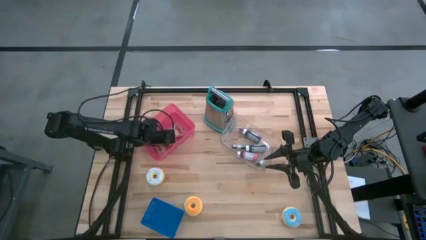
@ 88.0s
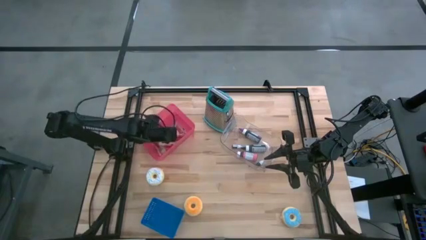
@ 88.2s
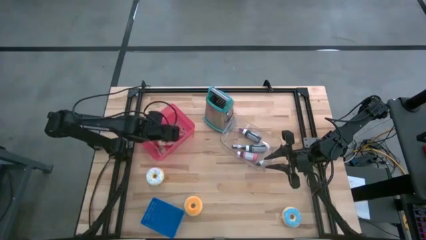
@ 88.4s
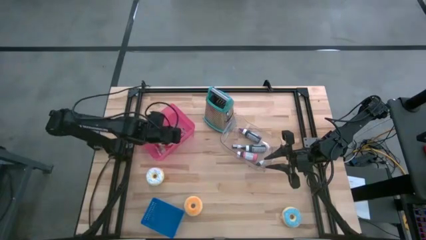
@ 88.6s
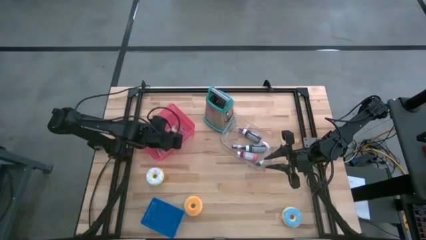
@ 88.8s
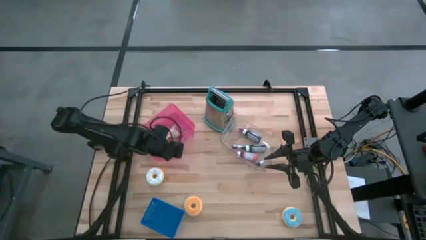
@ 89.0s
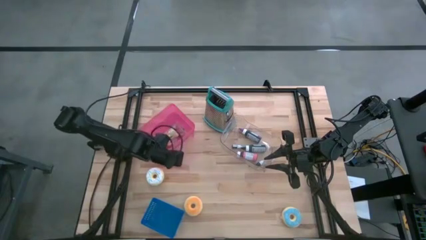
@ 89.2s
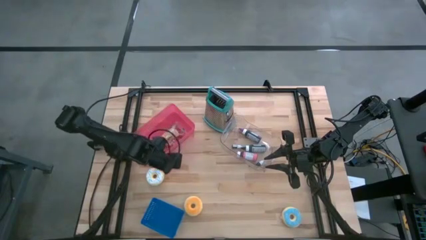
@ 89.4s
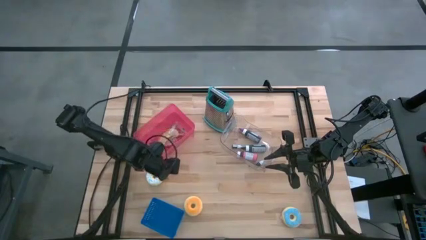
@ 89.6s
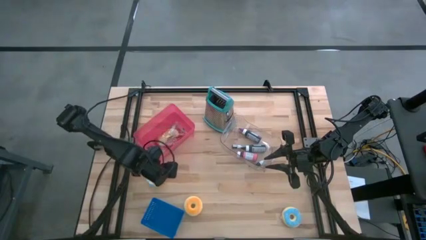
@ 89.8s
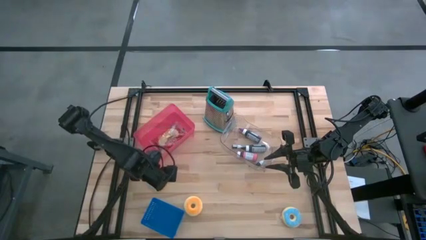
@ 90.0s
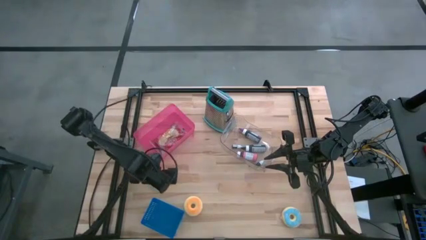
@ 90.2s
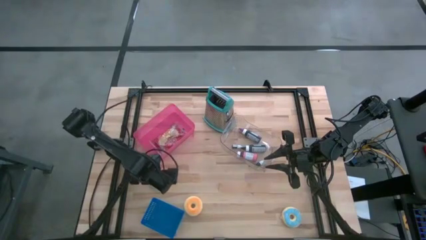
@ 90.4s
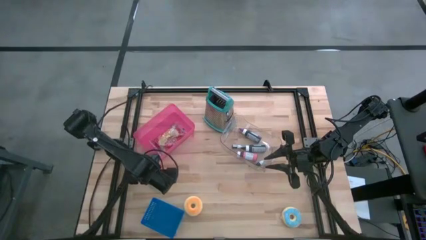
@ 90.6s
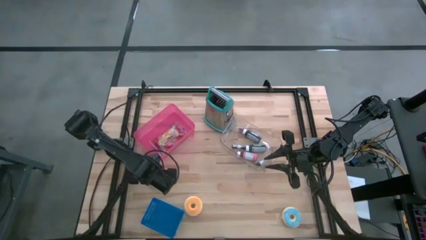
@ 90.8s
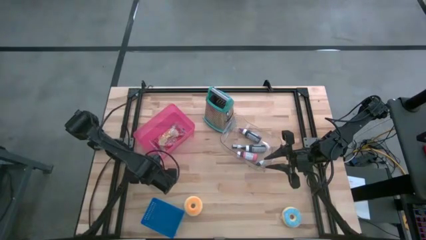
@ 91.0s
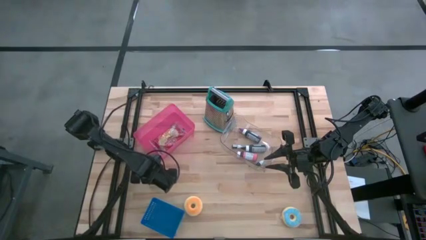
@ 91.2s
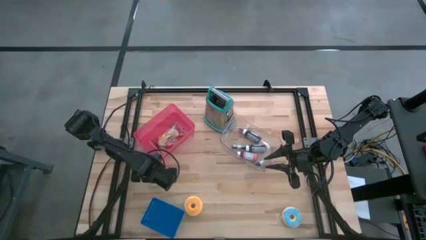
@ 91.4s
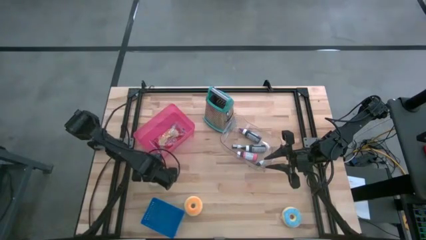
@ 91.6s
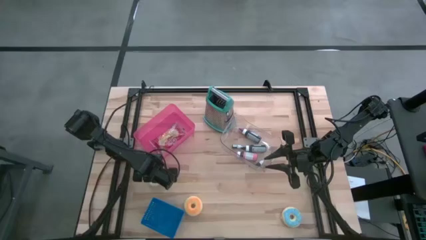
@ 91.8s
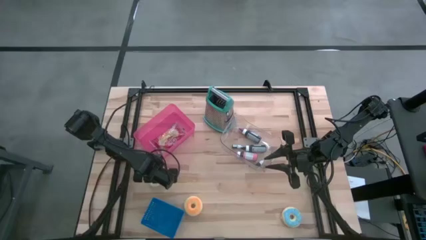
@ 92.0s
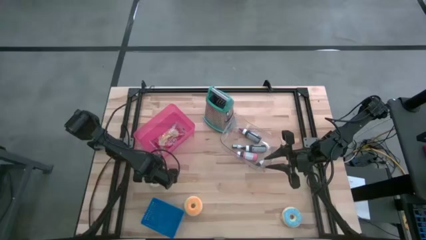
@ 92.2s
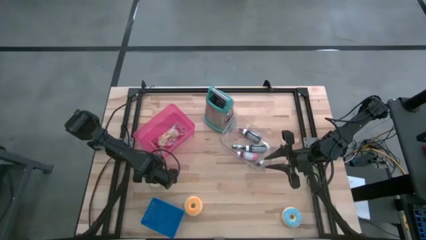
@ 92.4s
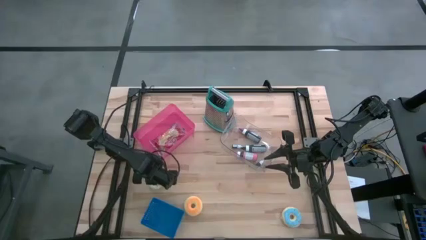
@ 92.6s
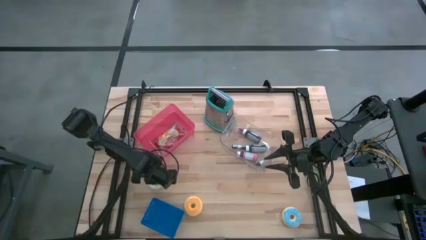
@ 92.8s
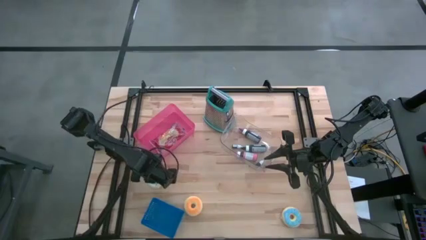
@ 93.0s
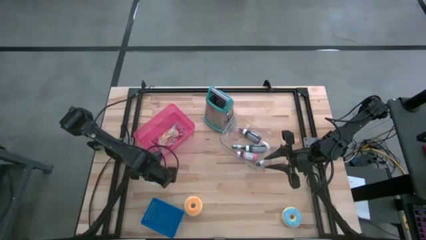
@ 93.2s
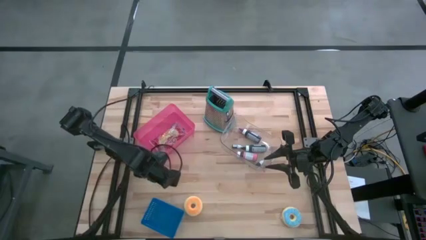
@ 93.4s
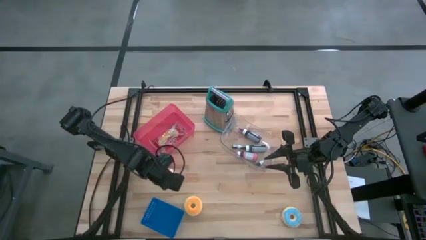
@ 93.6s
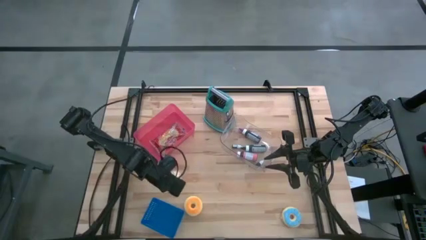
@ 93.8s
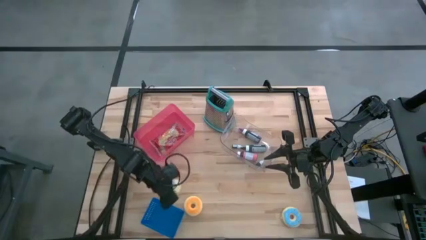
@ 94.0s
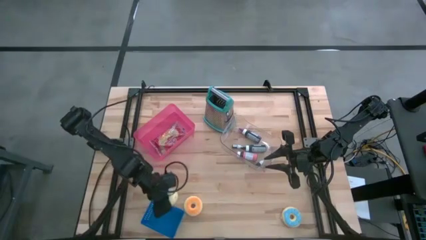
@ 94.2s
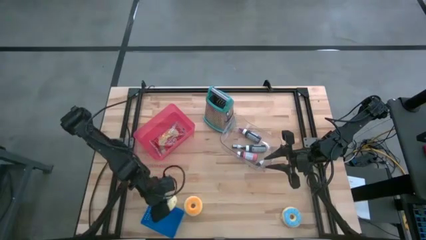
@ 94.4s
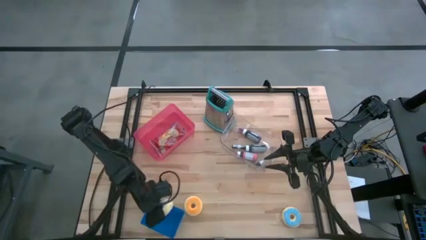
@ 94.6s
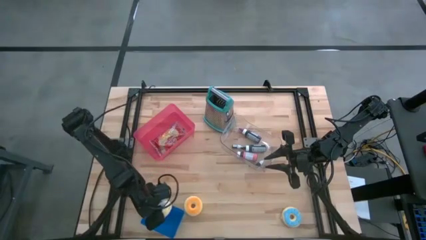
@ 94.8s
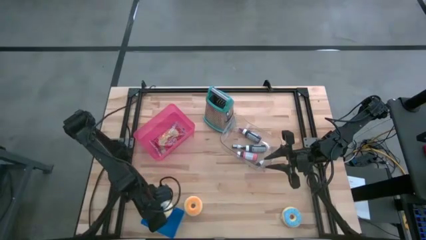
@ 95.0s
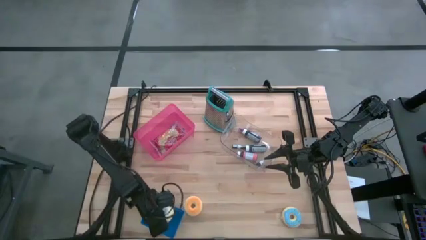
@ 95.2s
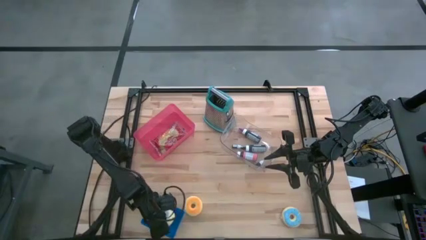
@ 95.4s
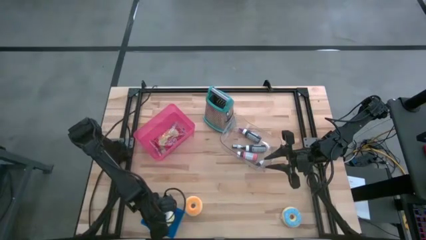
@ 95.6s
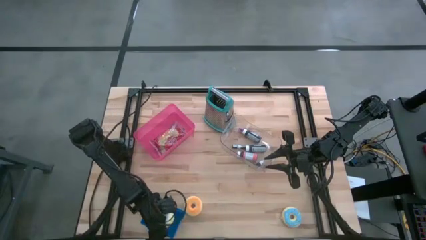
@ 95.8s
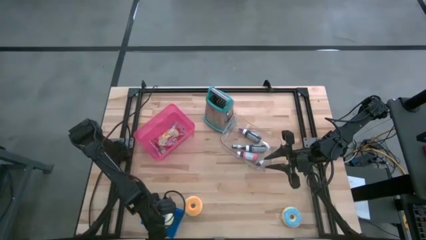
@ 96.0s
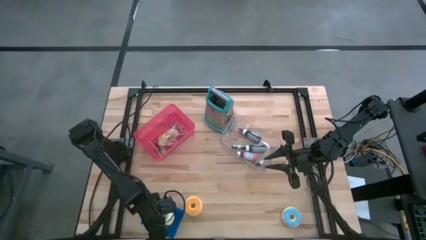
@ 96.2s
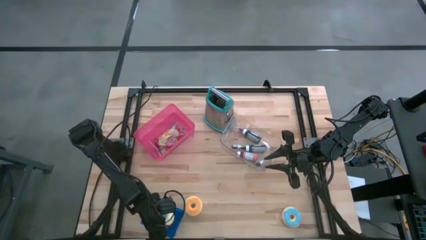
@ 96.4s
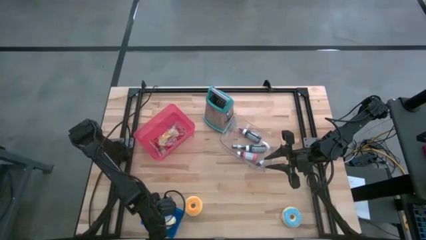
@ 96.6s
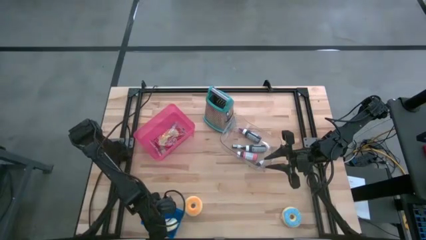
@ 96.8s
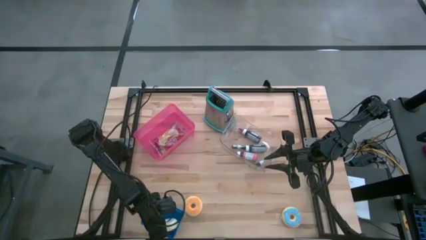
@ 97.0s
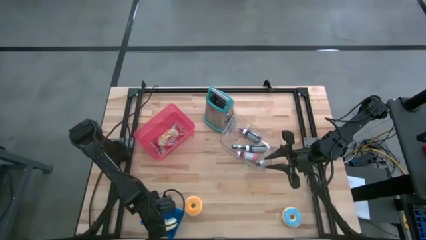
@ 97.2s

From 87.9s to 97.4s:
Task: Pick & Place Food Item
Put the white donut into the blue bin

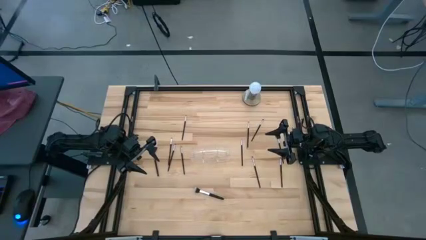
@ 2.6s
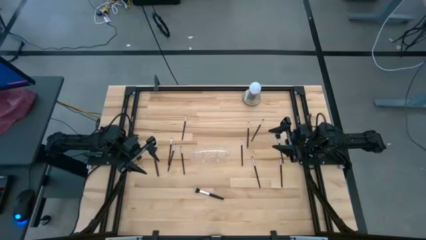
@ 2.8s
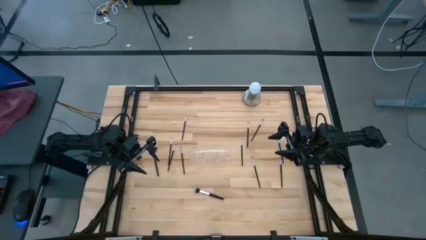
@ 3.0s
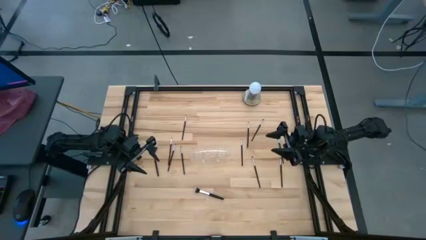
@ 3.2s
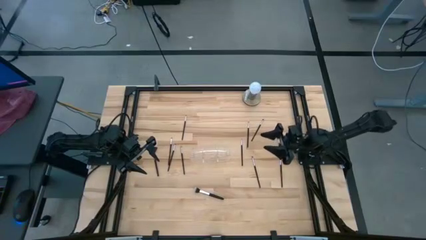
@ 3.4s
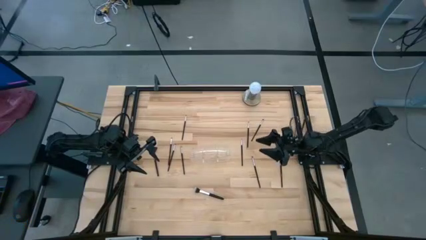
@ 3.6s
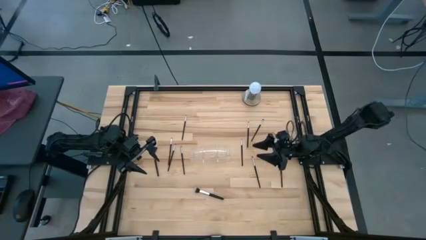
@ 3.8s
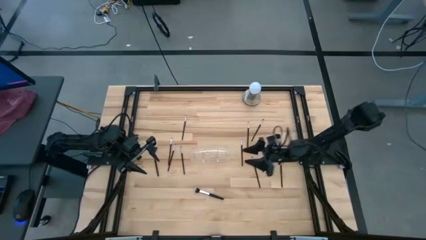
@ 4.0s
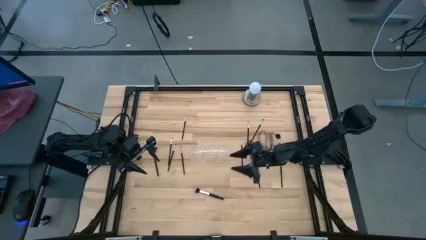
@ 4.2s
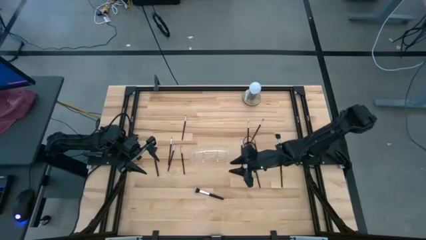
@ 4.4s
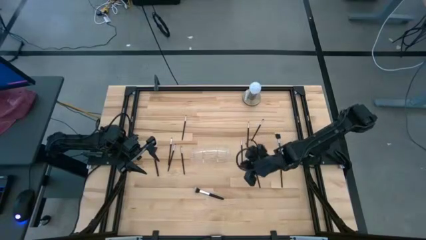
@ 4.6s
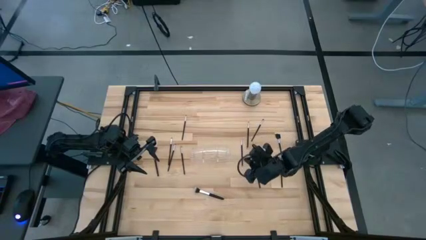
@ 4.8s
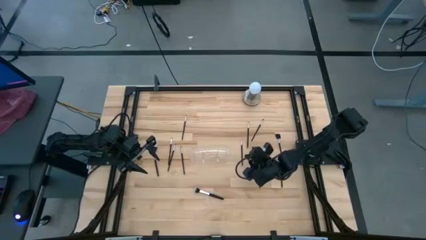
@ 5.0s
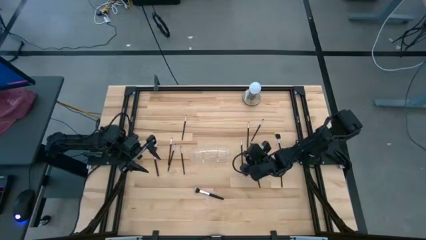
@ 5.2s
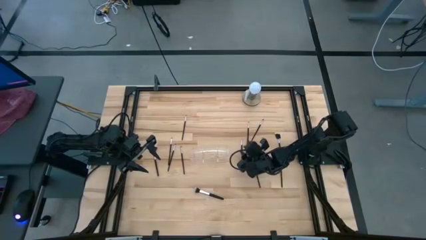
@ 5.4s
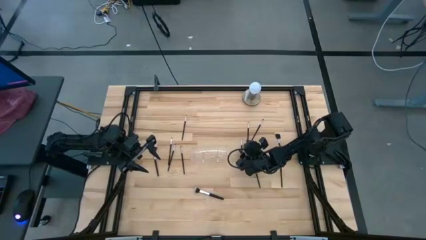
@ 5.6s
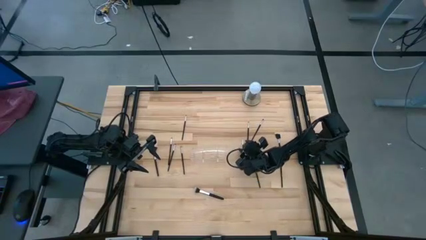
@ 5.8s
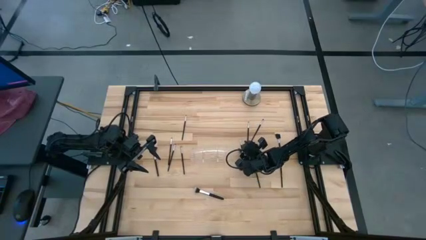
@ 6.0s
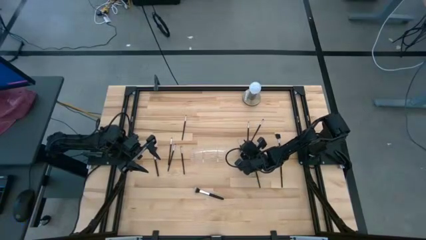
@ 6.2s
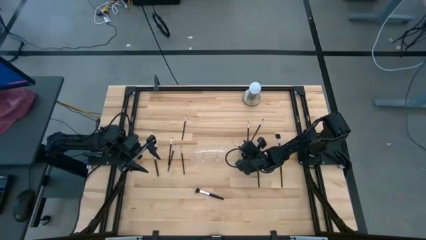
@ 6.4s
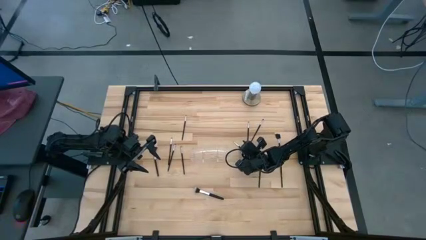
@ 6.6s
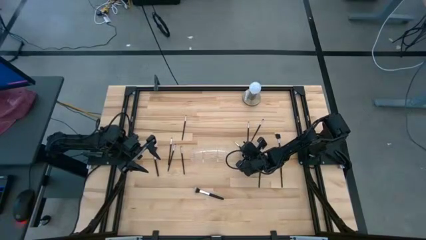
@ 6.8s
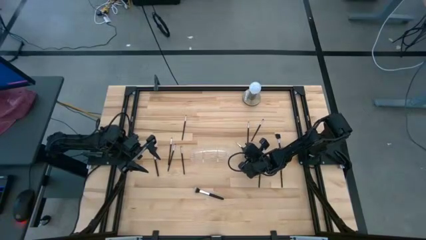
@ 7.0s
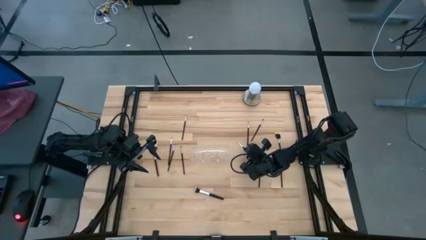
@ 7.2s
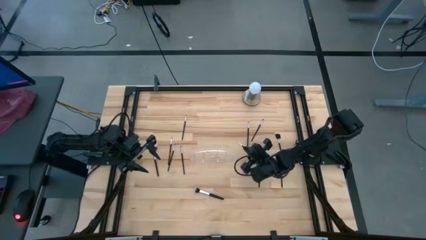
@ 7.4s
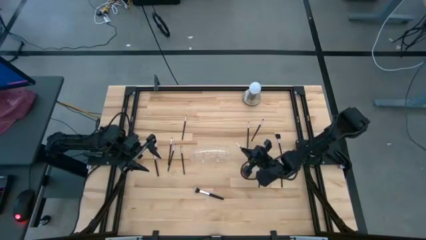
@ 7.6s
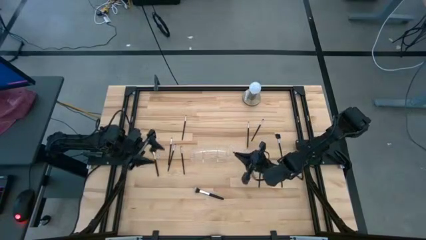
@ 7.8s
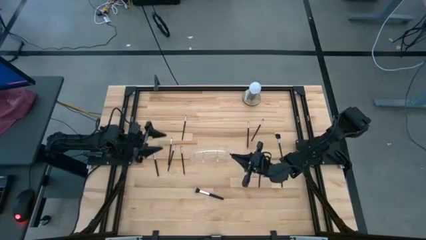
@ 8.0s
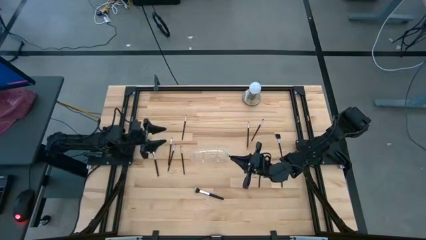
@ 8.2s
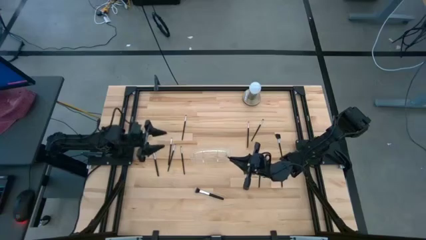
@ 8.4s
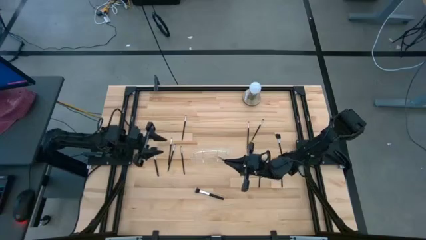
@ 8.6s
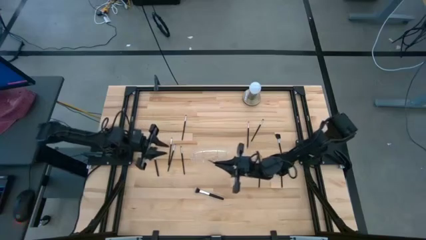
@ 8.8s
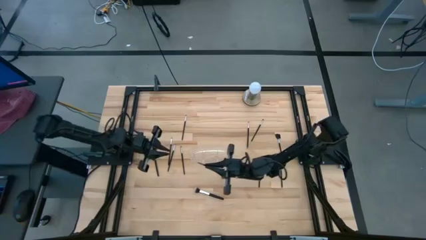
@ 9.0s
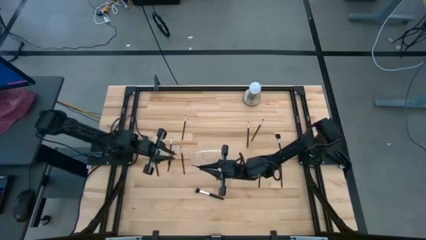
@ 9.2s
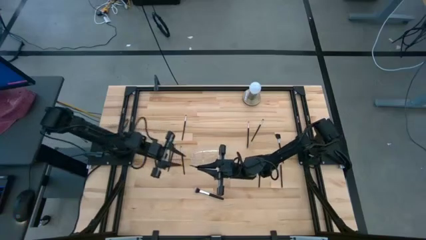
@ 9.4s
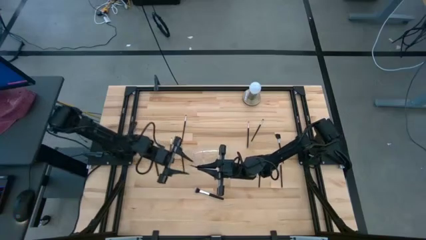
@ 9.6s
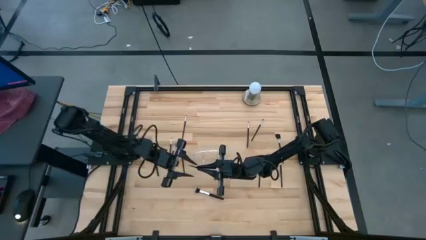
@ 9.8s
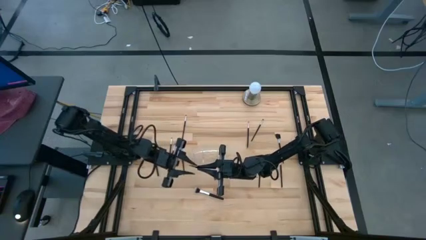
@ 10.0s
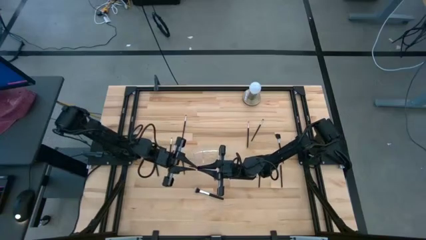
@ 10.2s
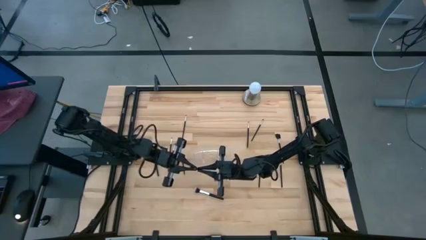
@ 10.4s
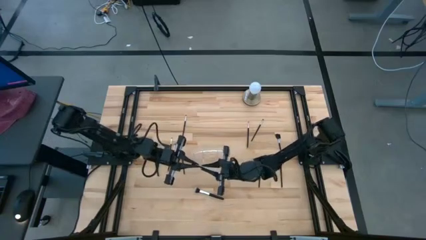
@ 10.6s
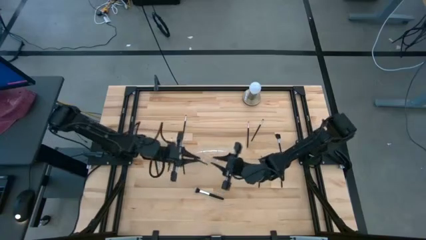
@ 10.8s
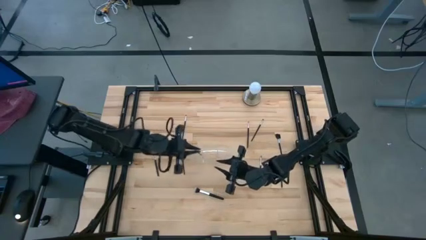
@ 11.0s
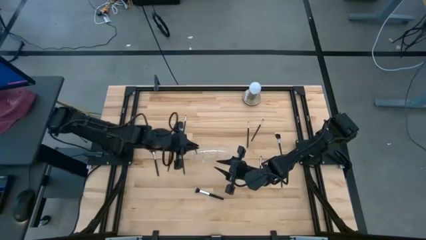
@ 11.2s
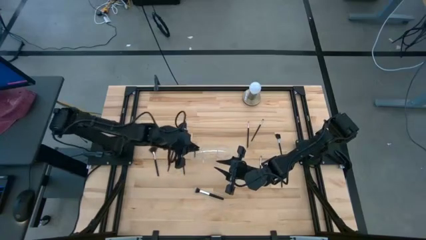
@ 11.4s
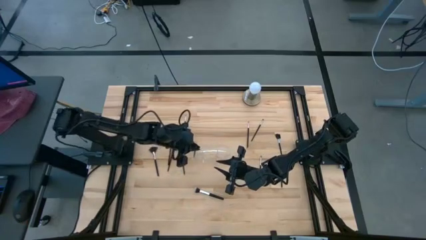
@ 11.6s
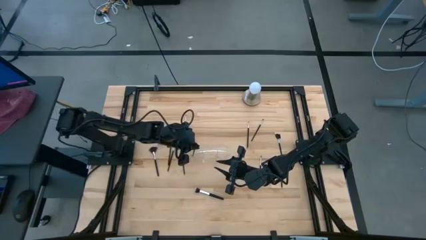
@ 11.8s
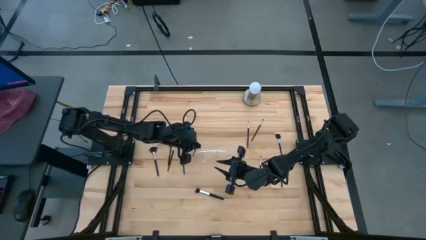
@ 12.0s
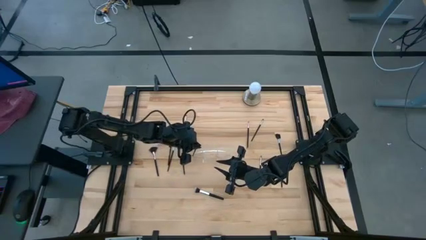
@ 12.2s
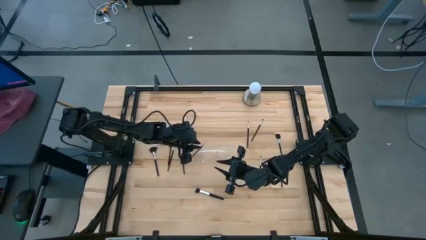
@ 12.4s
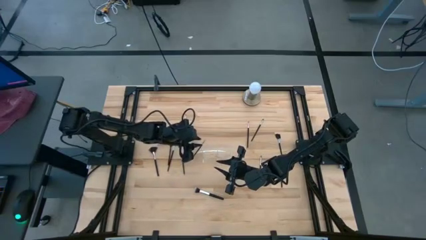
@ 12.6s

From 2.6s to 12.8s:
Task: Put items in baskets/containers
Put the liner brush into the transparent organizer
